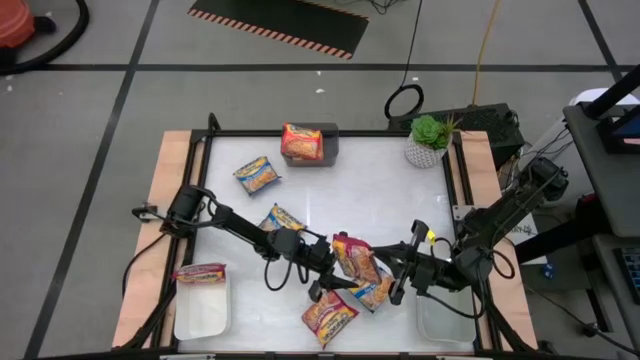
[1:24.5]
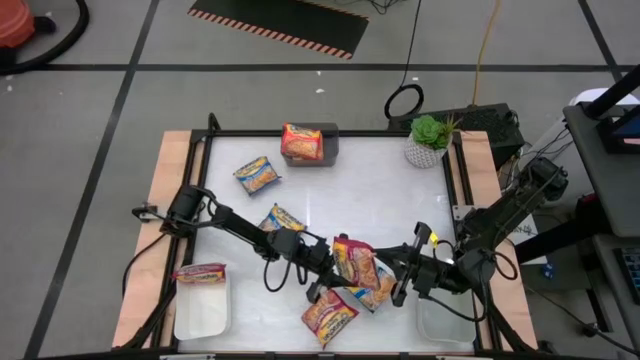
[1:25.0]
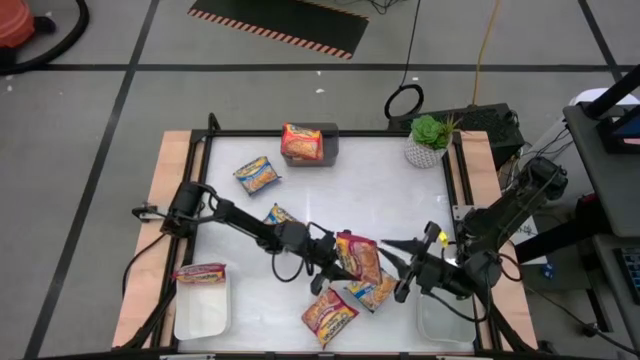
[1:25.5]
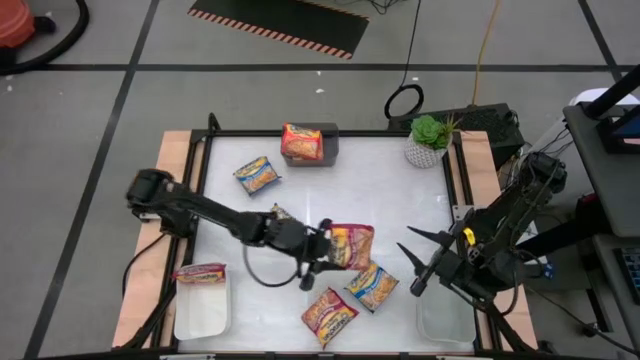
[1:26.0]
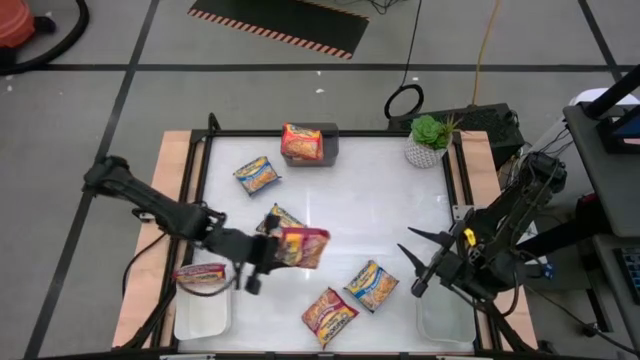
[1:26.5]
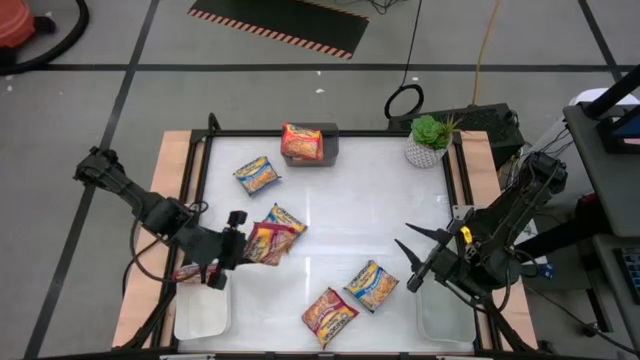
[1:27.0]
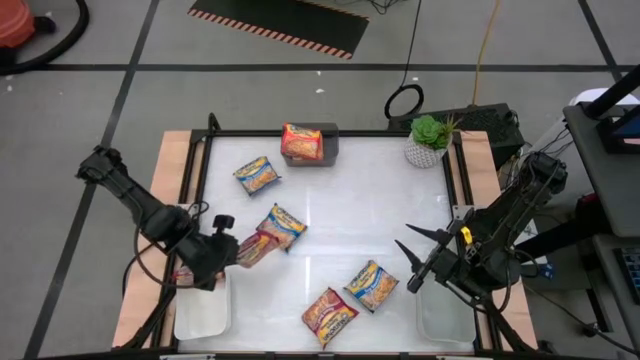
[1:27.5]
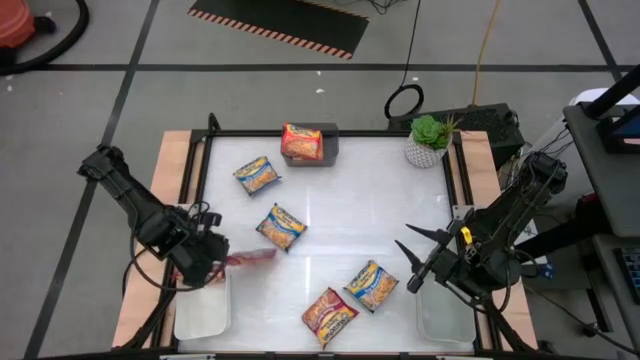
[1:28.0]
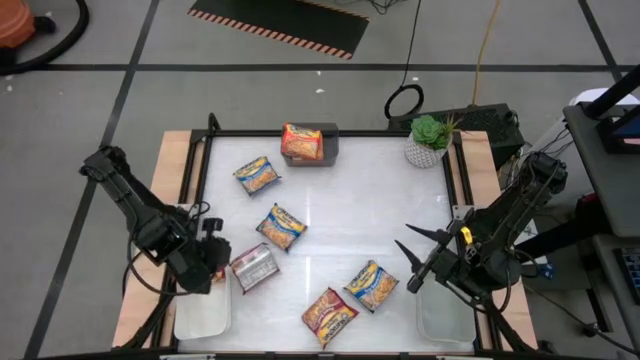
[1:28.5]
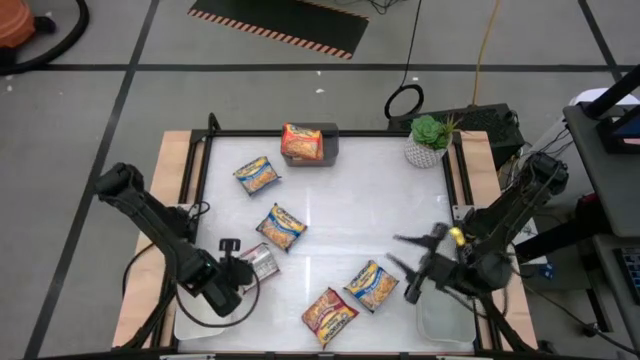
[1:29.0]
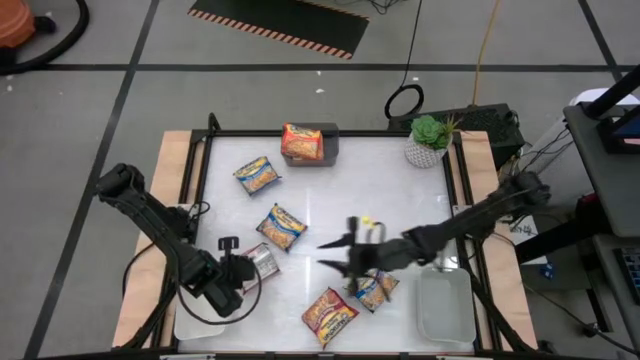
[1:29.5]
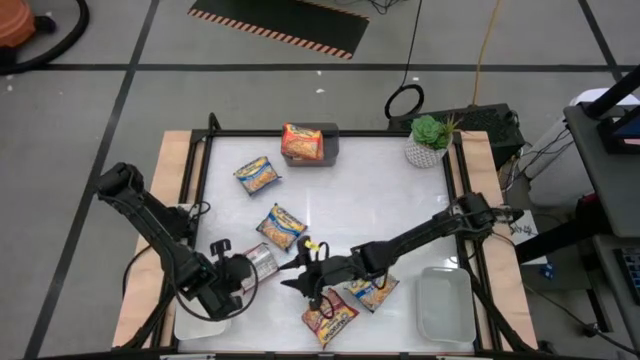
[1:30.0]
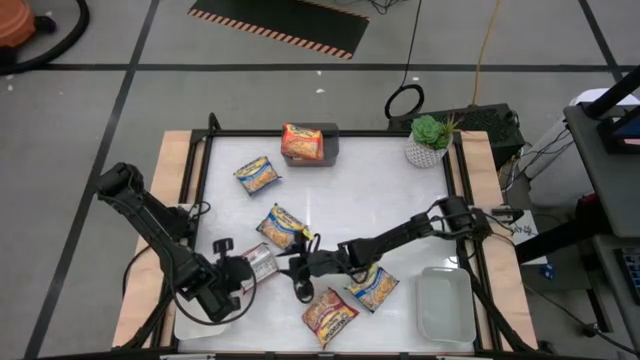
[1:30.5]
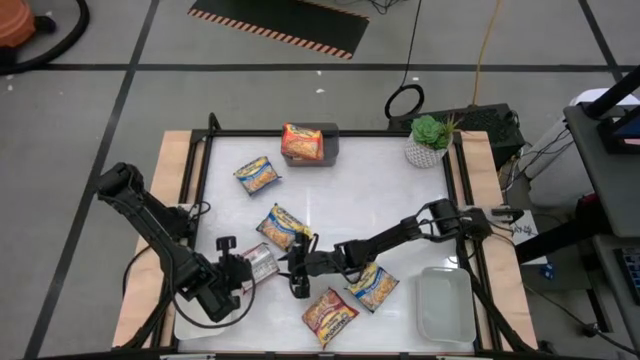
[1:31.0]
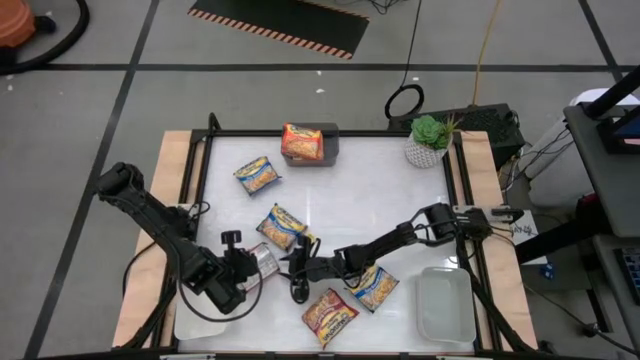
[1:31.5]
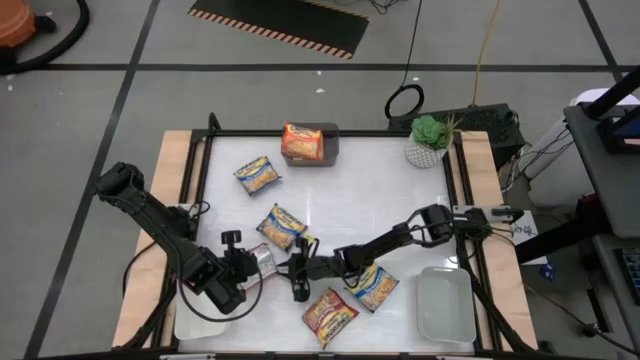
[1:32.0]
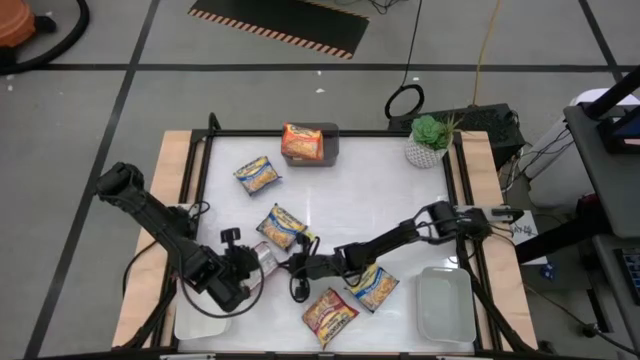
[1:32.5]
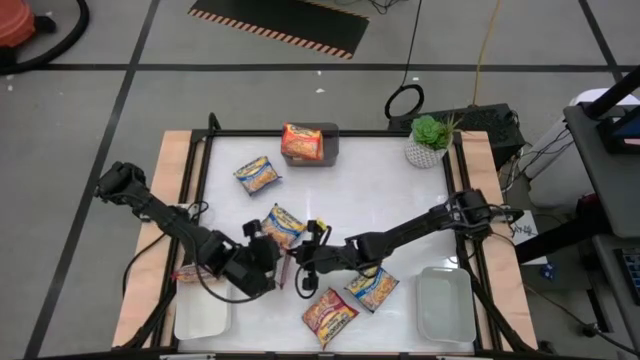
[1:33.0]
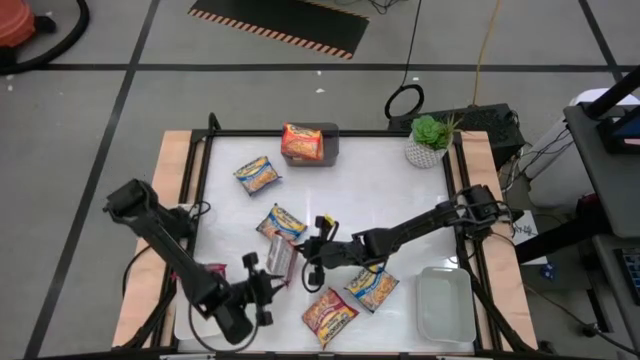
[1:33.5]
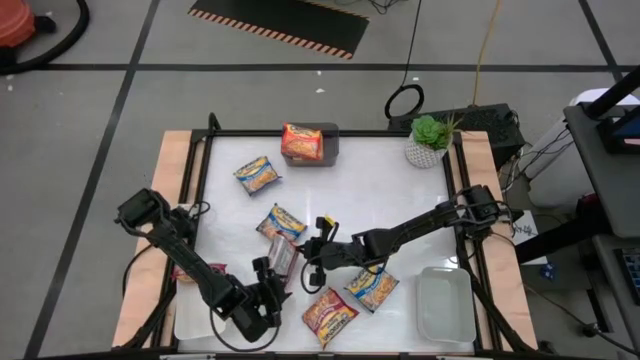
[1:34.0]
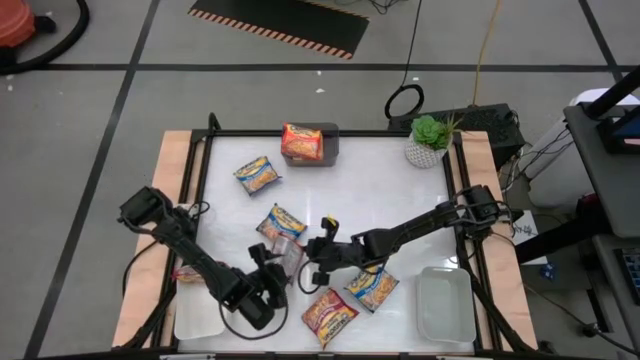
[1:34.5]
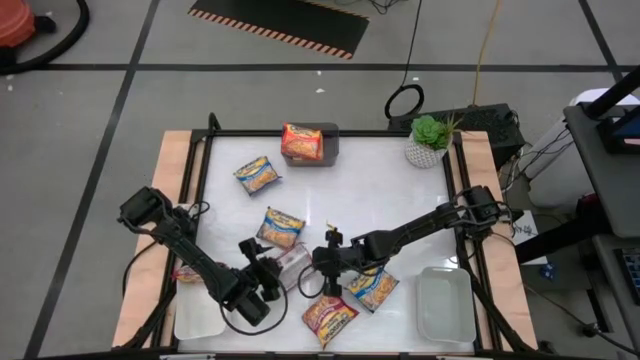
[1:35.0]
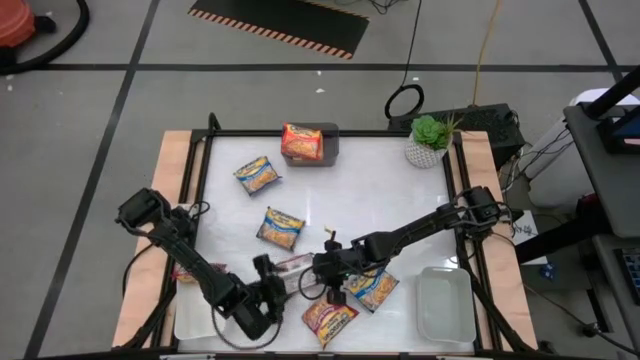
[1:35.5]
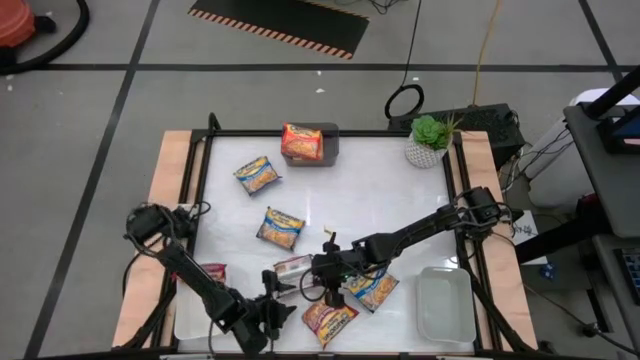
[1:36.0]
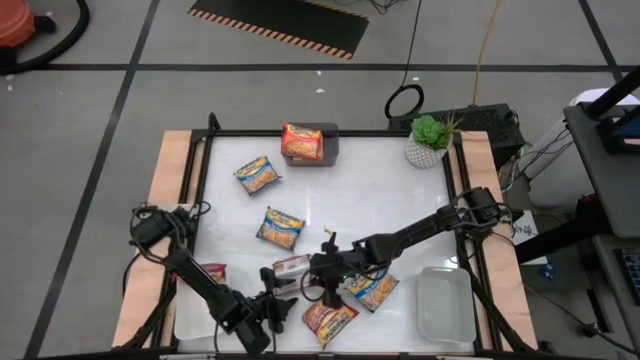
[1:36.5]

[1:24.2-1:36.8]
Task: Sort Maruchan noodles
Put the top red noodle pack into the white bin

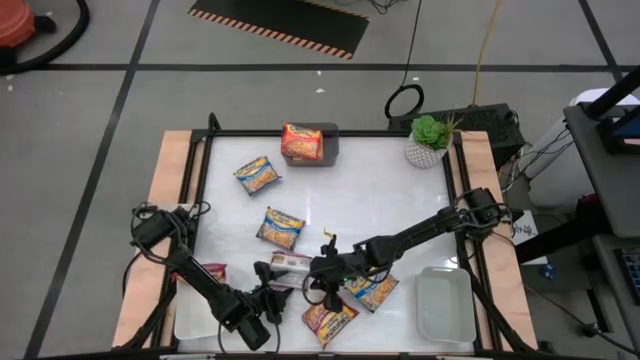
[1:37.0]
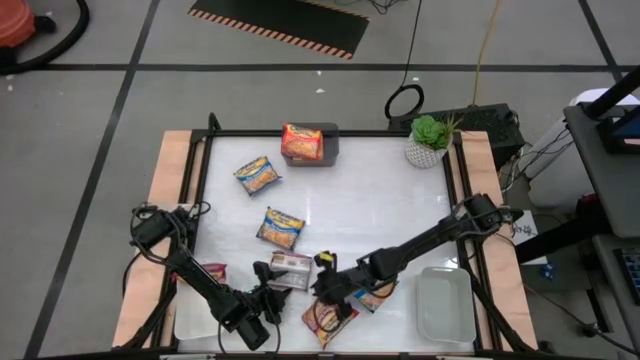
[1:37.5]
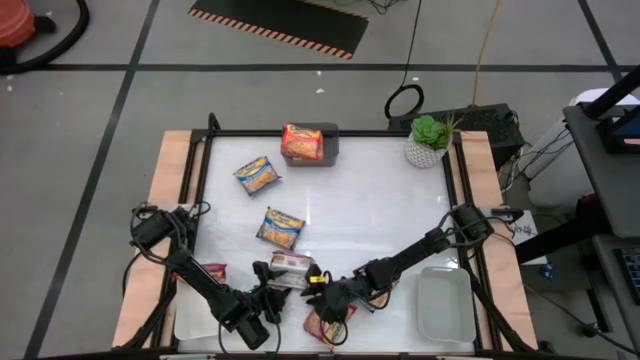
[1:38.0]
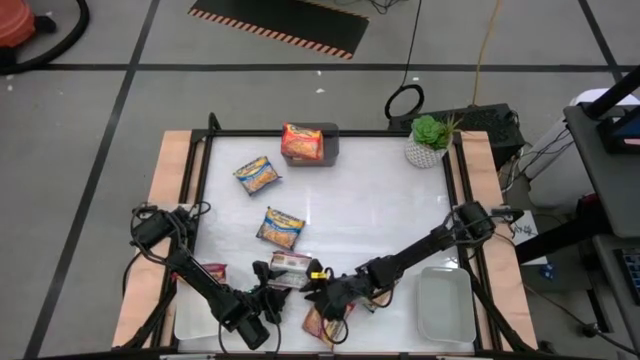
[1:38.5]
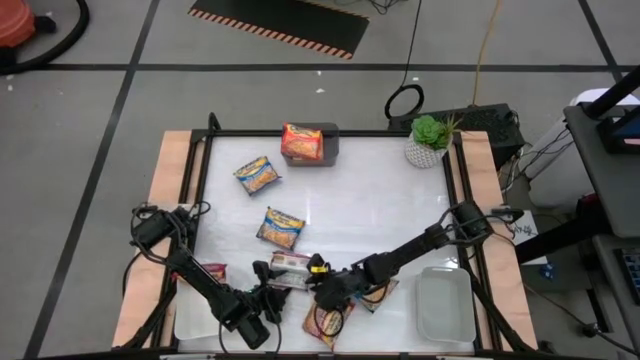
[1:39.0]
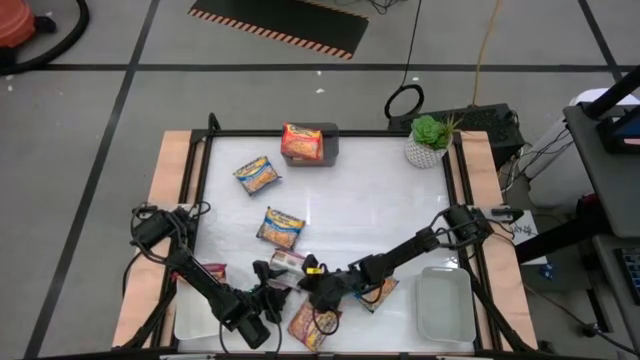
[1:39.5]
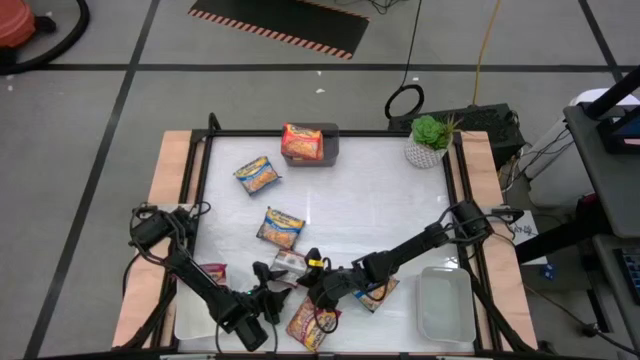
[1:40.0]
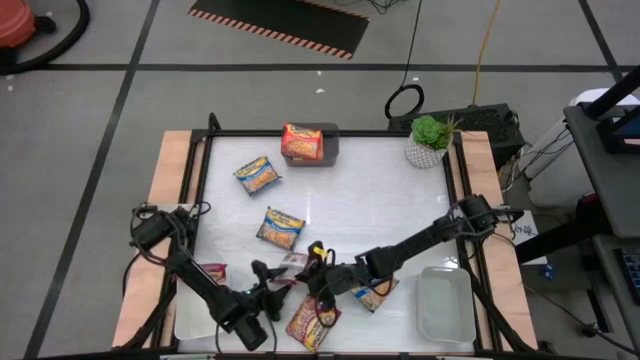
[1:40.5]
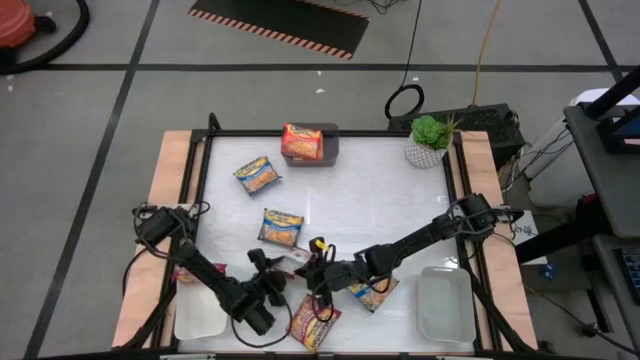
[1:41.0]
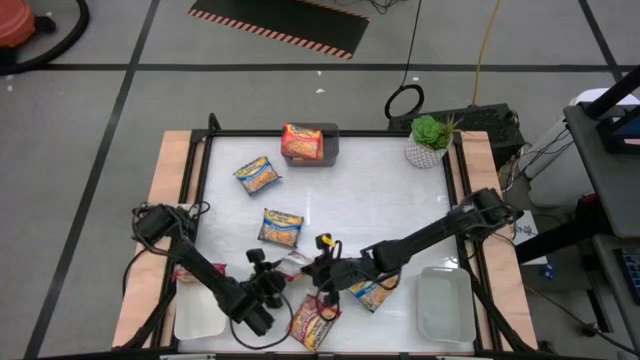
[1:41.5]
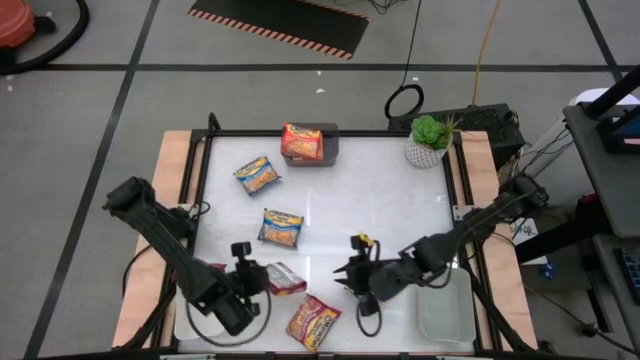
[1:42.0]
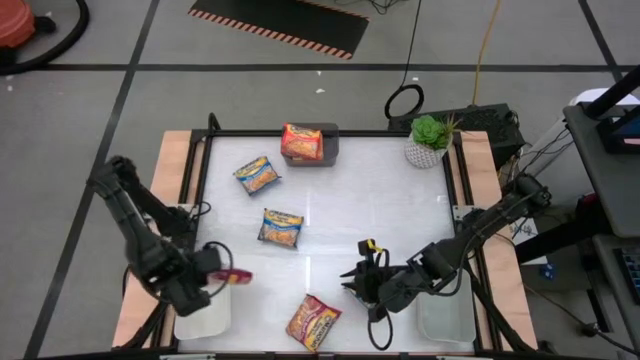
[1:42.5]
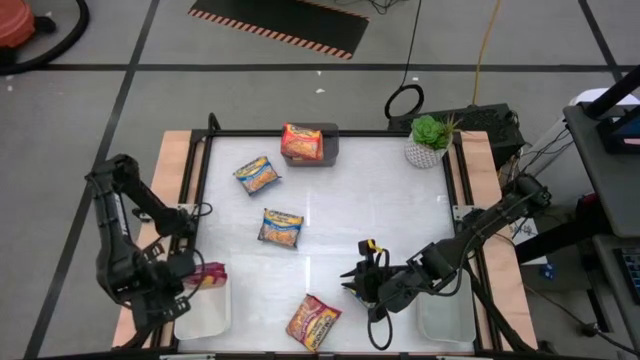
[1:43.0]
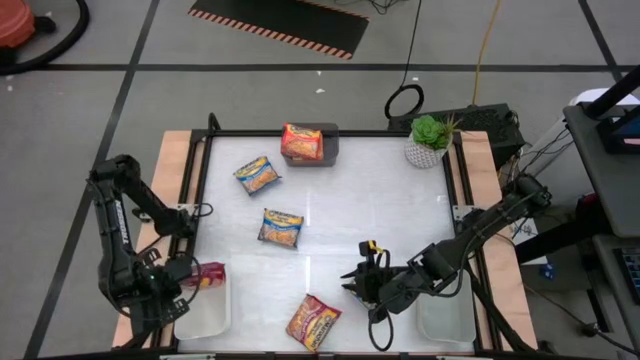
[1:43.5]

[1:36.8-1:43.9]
Put the top red noodle pack into the white bin
